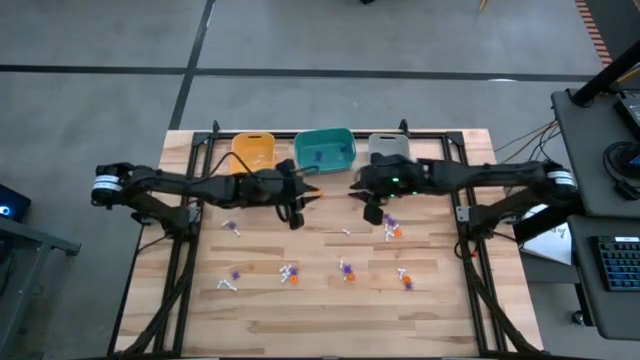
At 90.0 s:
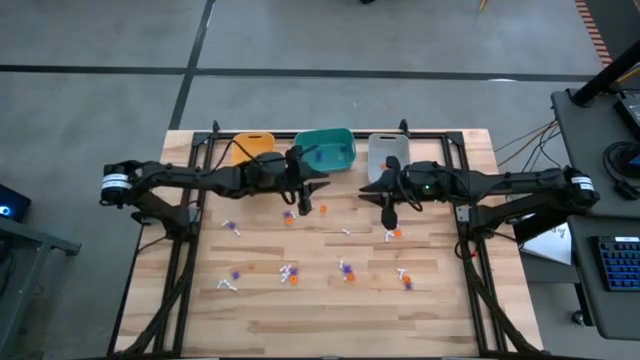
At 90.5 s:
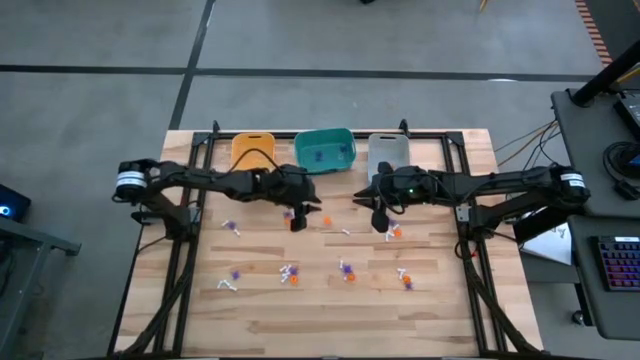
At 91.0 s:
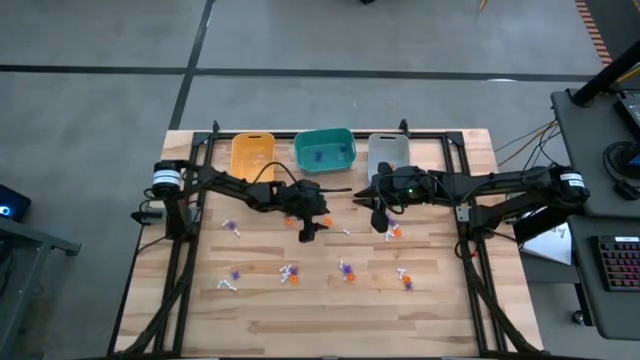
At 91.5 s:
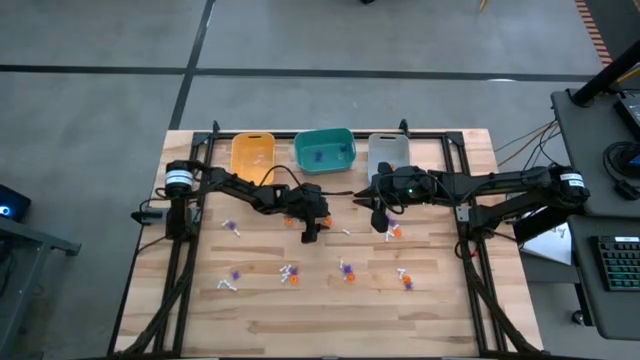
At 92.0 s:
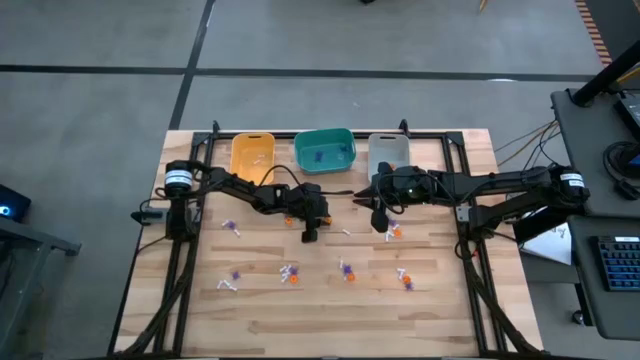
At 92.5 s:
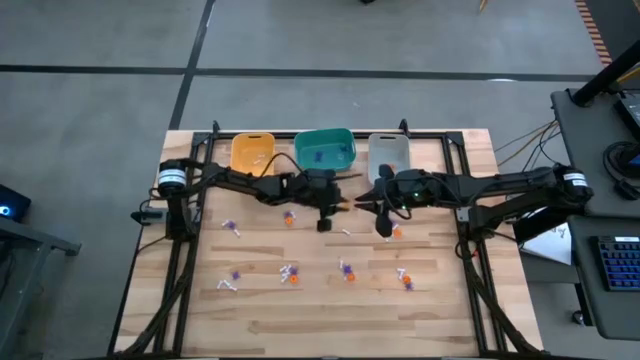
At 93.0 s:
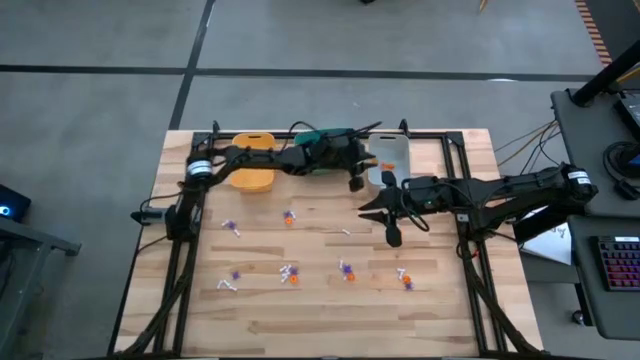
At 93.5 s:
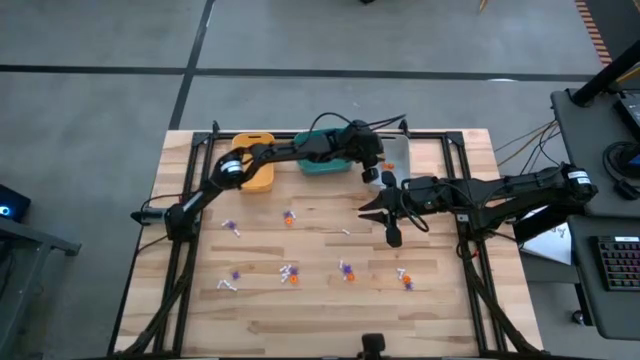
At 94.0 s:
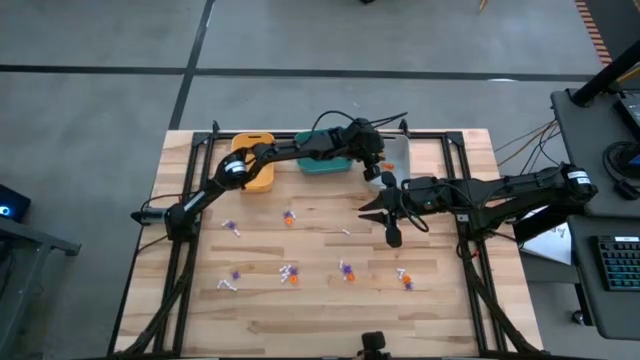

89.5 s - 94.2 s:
Task: Sort Halloween decoration
Put the orange pumpkin toy into the gray bin

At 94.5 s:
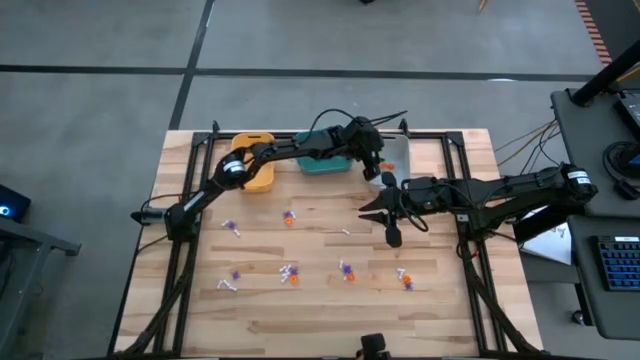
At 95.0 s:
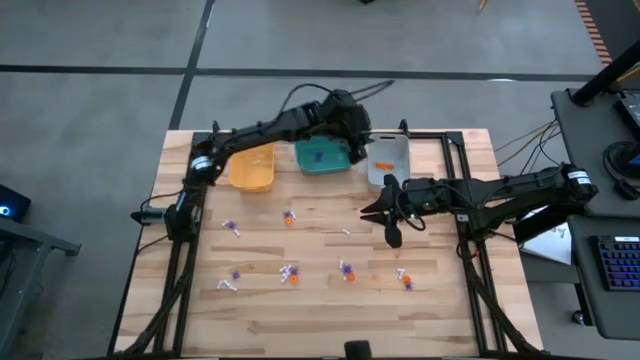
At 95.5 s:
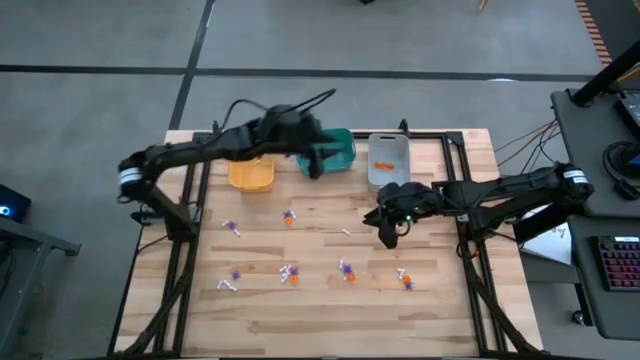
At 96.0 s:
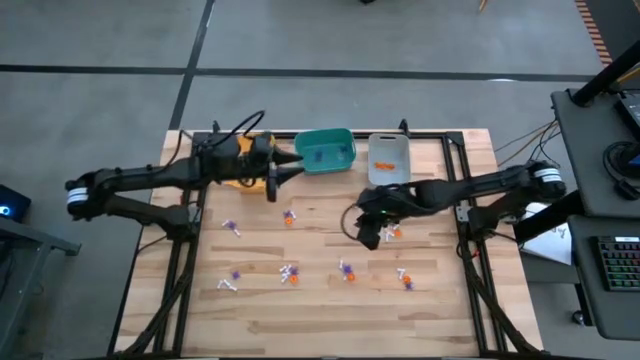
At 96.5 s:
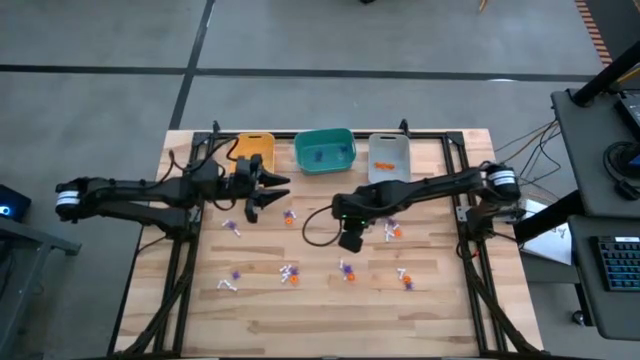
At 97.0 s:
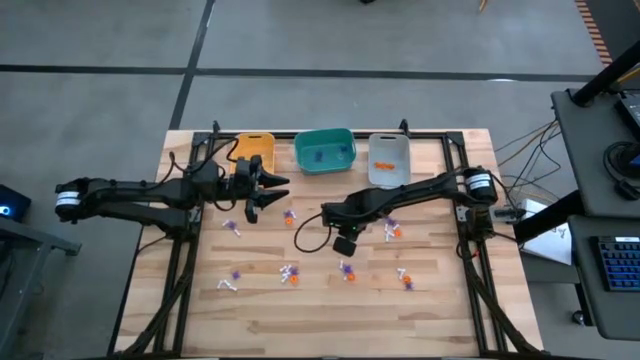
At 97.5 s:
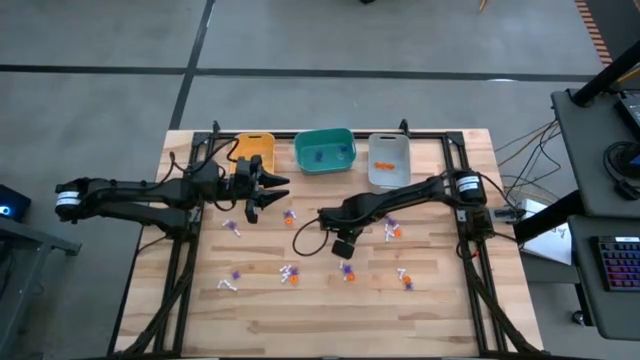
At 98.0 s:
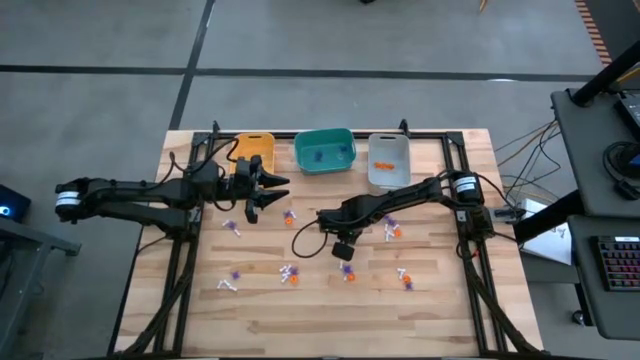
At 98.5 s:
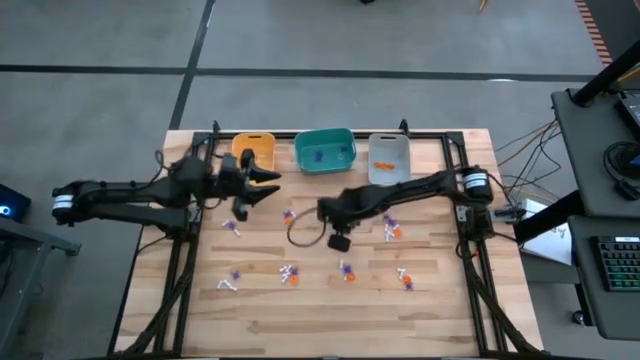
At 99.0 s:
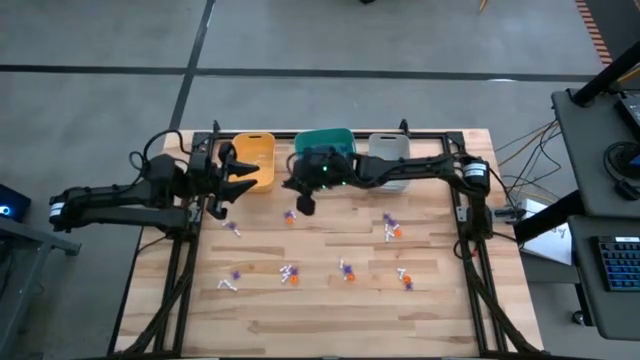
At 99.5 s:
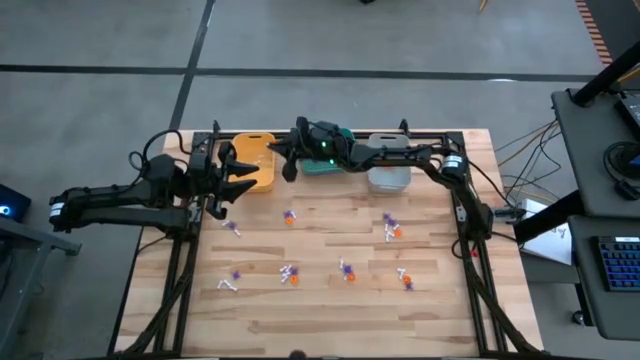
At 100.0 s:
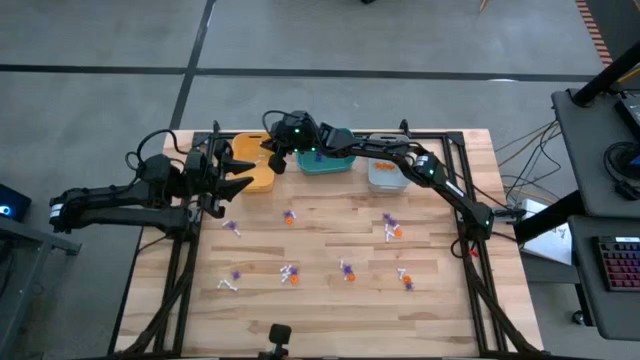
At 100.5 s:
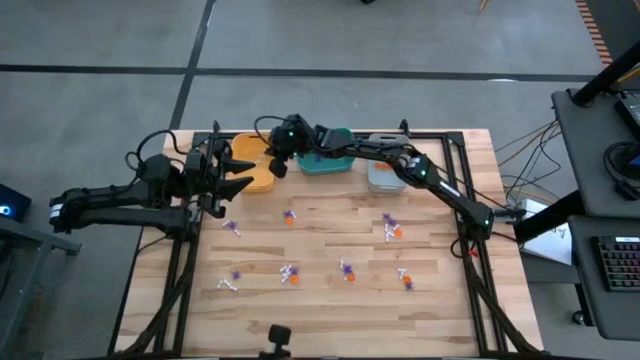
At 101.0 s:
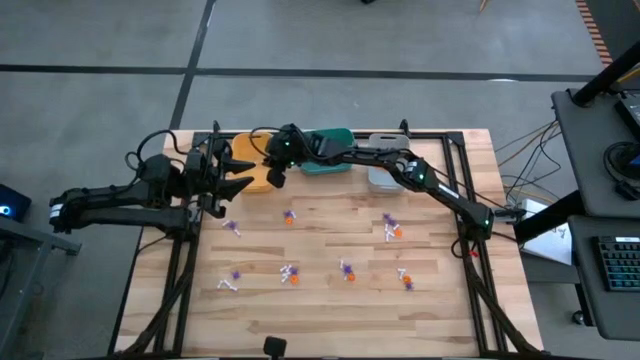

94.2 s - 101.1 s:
Put the white bone toy into the yellow bin

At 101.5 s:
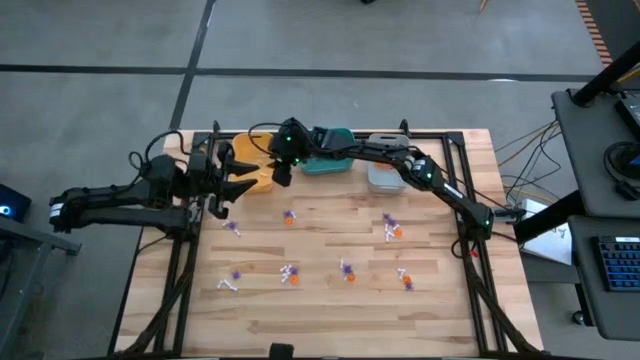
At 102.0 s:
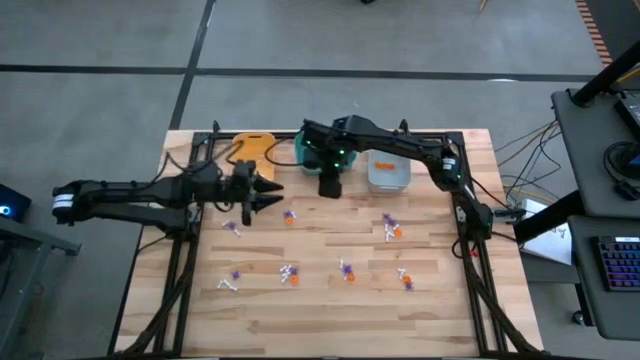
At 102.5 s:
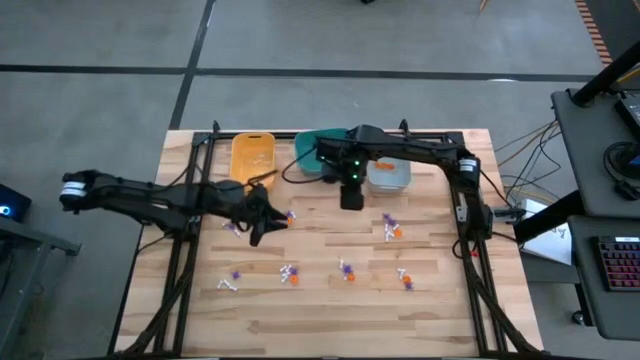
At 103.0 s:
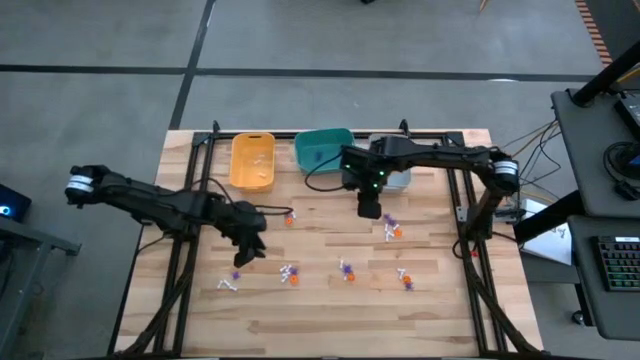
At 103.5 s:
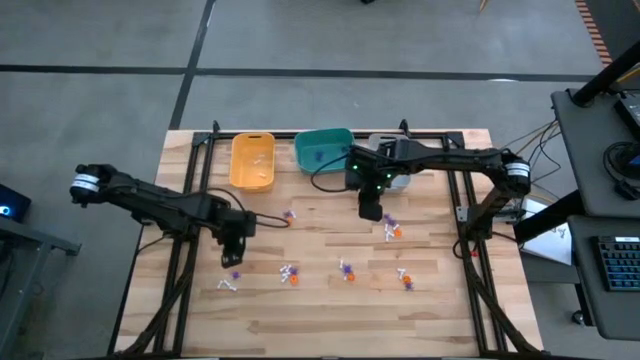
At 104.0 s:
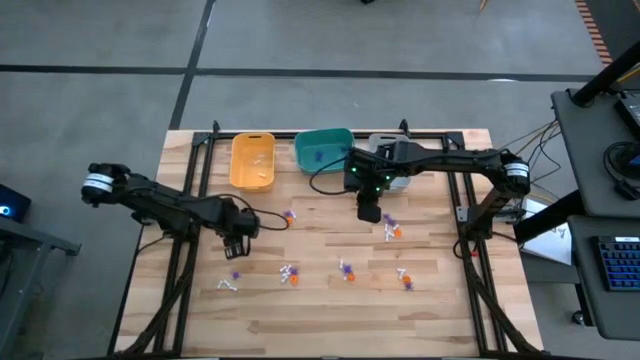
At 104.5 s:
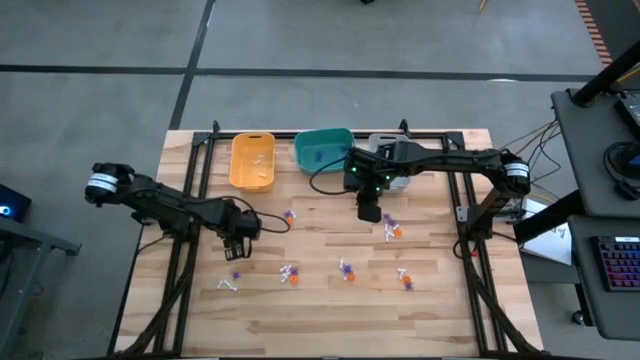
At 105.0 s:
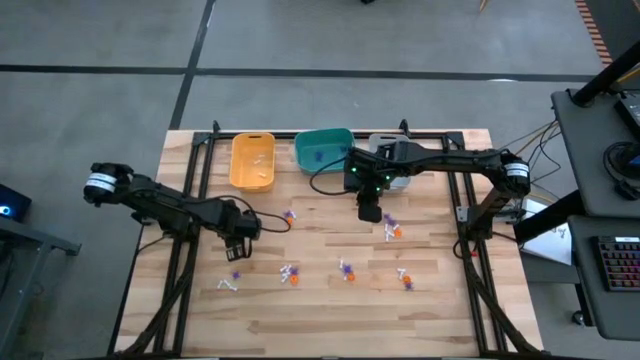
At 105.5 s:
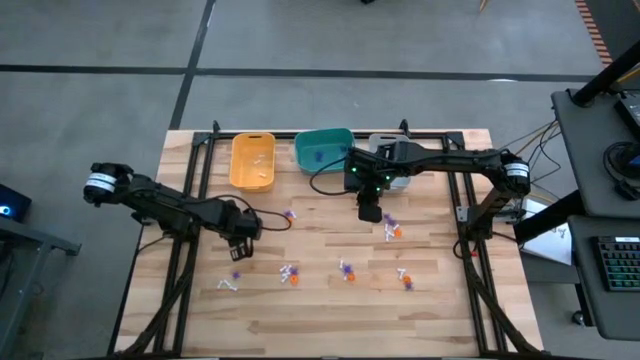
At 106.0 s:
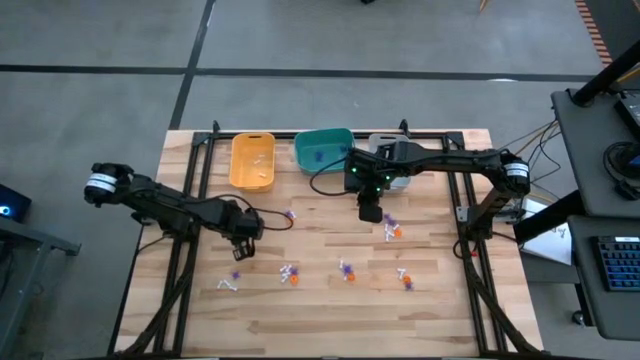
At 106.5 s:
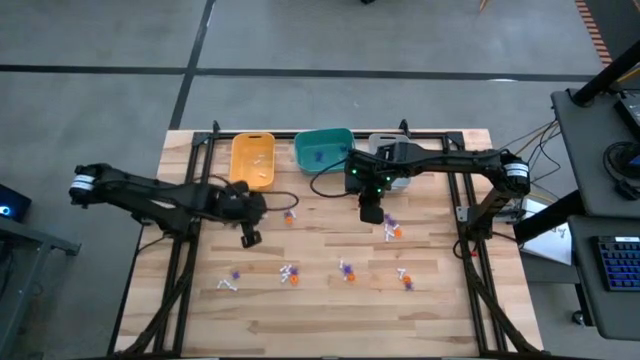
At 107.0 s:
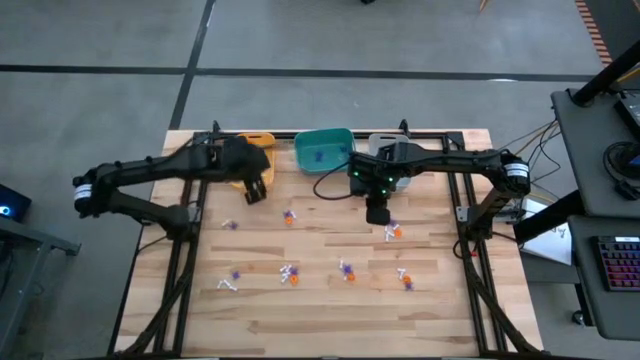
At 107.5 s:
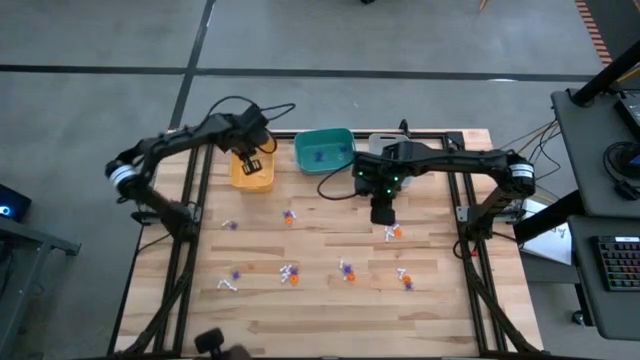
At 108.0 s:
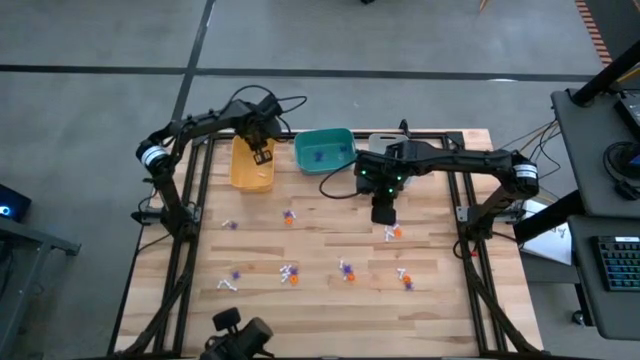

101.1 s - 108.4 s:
Put the white bone toy into the yellow bin
